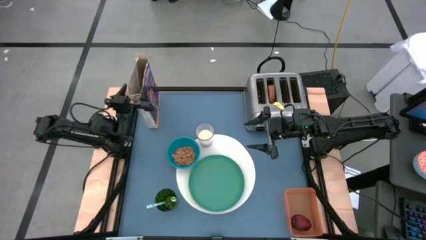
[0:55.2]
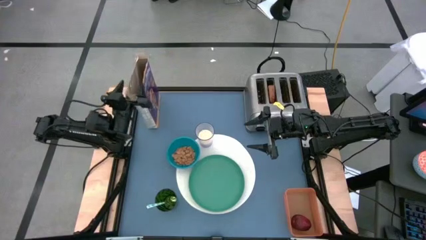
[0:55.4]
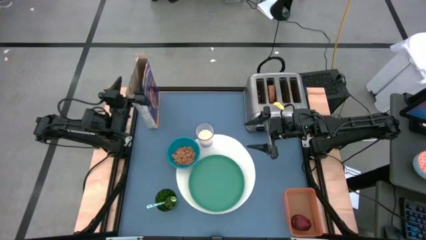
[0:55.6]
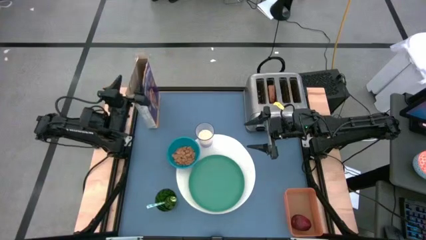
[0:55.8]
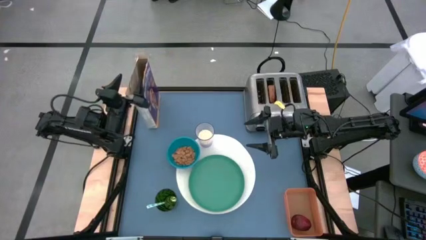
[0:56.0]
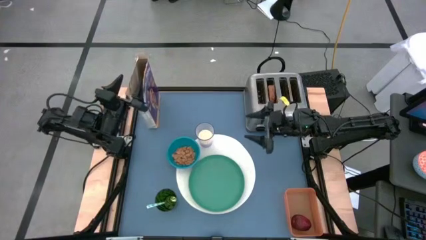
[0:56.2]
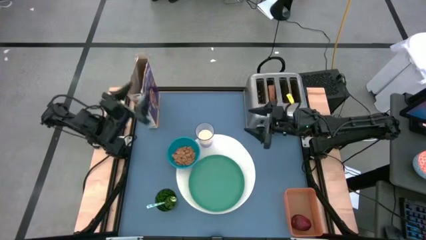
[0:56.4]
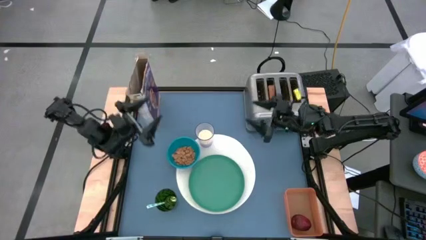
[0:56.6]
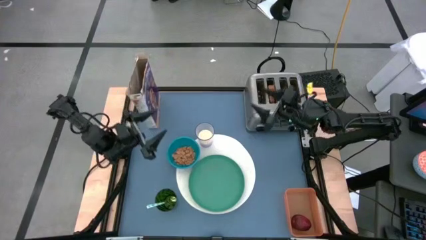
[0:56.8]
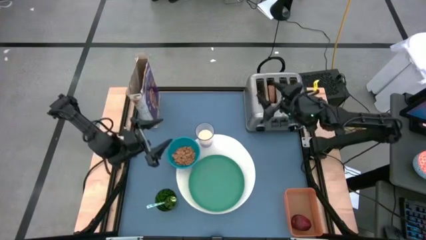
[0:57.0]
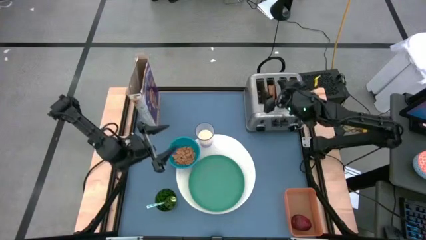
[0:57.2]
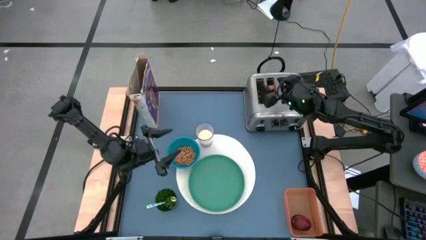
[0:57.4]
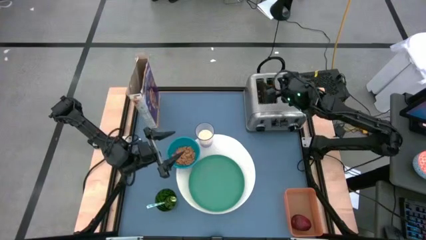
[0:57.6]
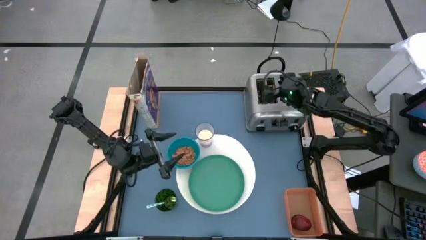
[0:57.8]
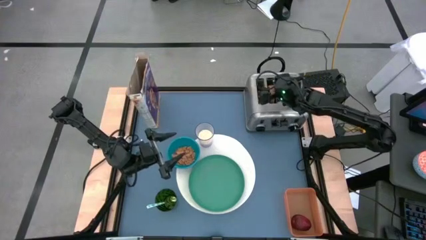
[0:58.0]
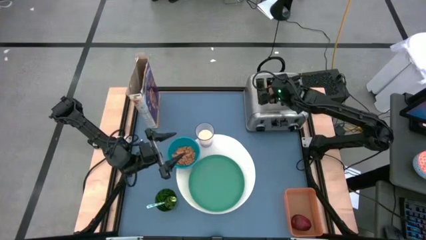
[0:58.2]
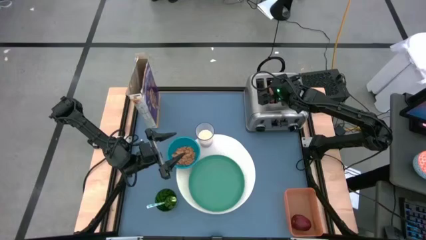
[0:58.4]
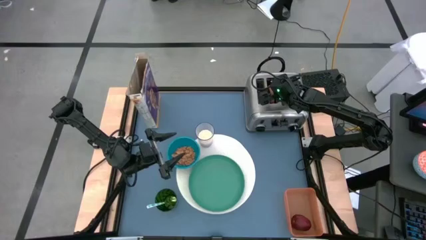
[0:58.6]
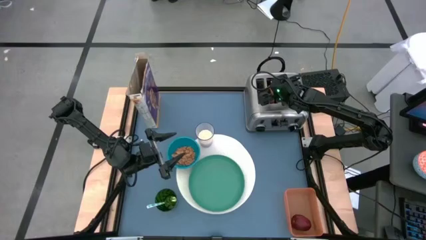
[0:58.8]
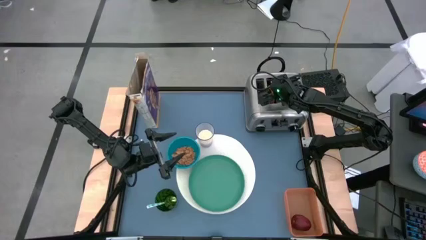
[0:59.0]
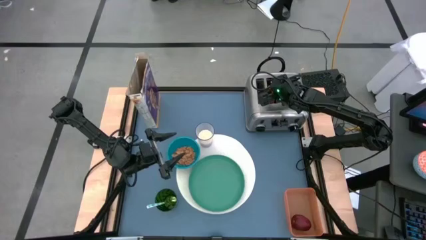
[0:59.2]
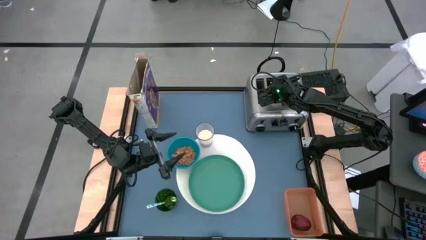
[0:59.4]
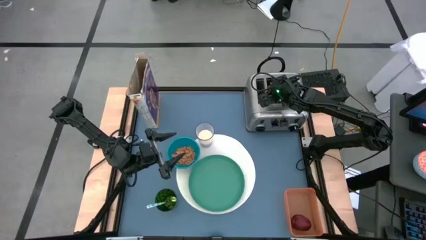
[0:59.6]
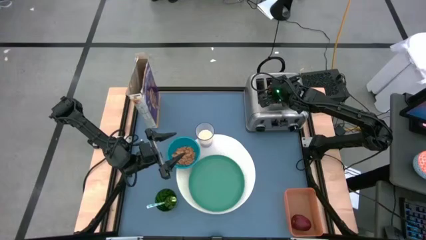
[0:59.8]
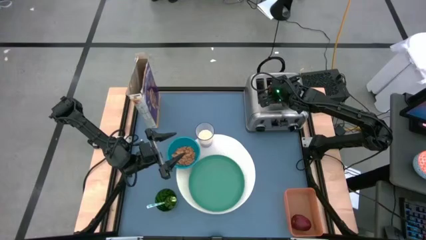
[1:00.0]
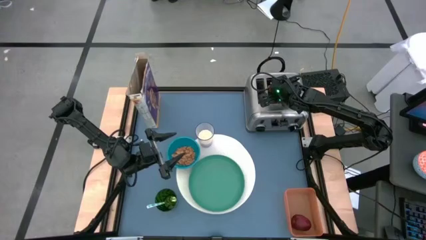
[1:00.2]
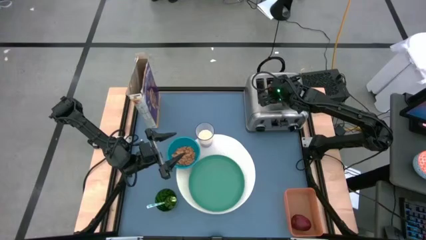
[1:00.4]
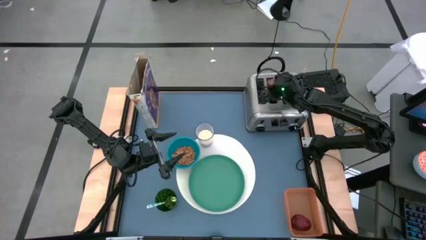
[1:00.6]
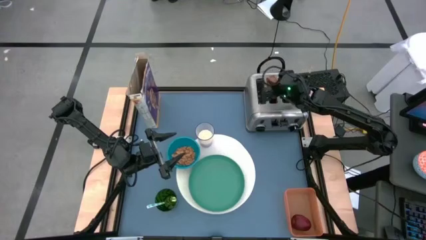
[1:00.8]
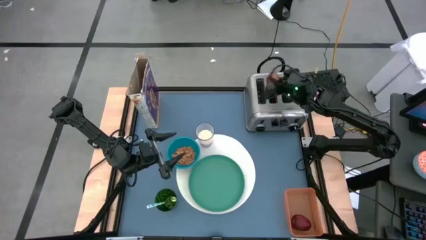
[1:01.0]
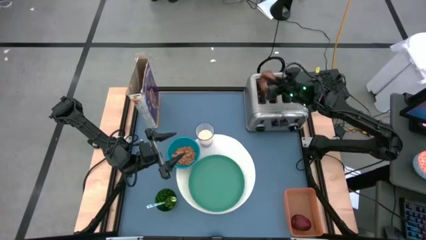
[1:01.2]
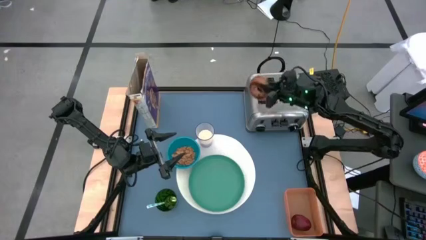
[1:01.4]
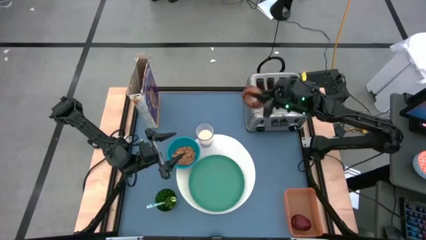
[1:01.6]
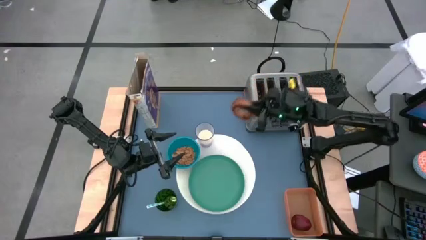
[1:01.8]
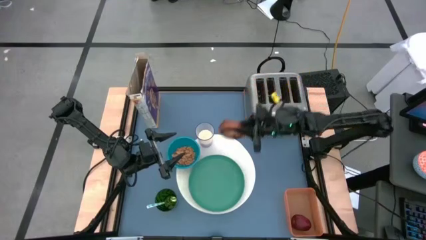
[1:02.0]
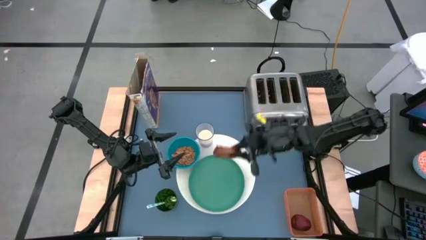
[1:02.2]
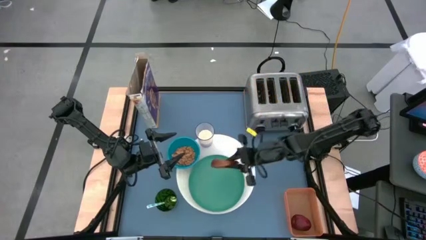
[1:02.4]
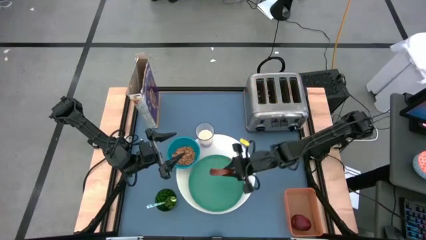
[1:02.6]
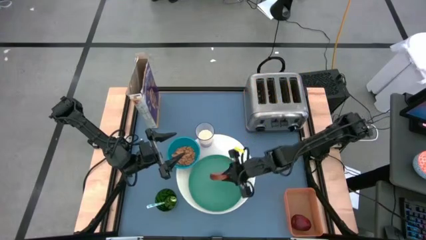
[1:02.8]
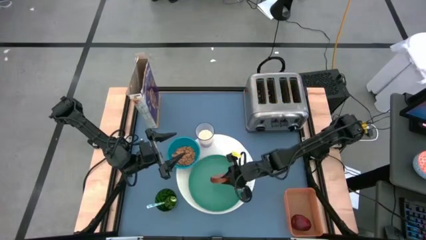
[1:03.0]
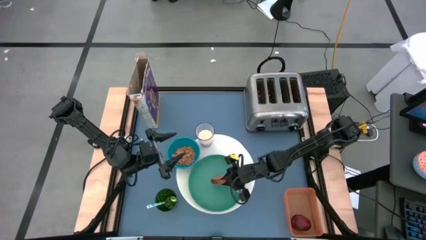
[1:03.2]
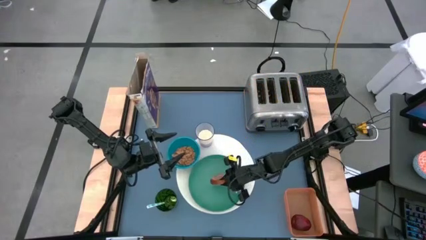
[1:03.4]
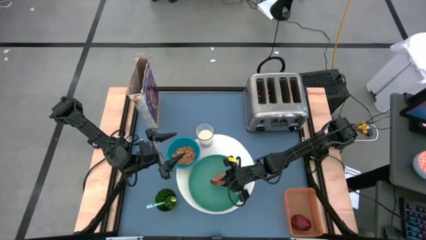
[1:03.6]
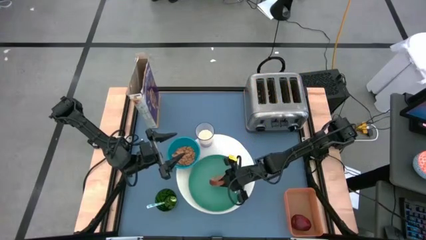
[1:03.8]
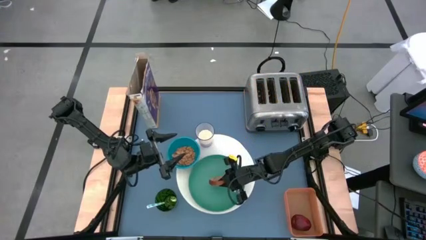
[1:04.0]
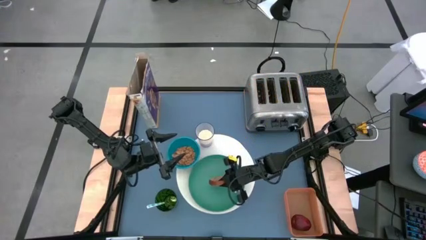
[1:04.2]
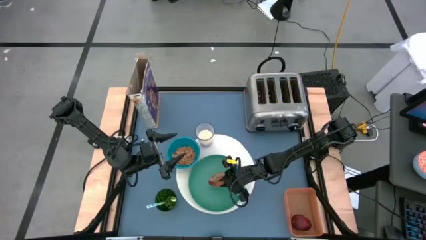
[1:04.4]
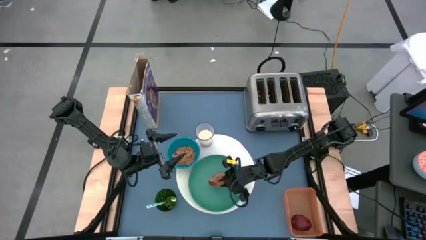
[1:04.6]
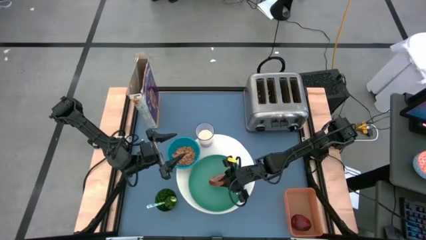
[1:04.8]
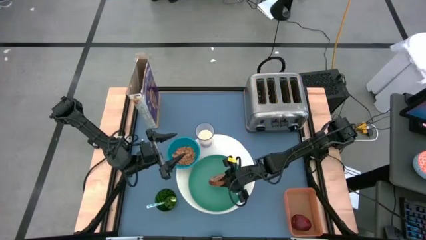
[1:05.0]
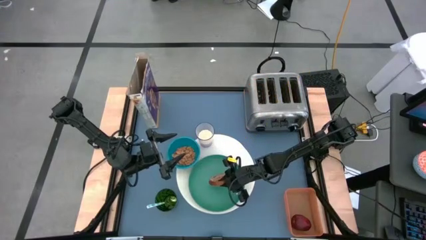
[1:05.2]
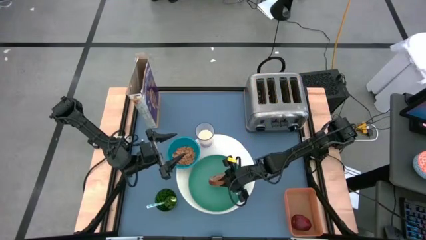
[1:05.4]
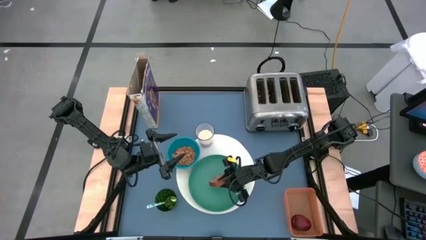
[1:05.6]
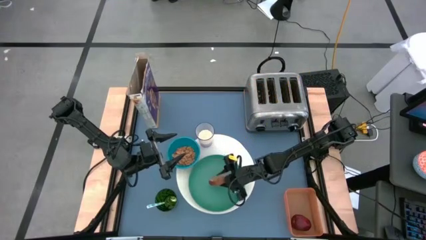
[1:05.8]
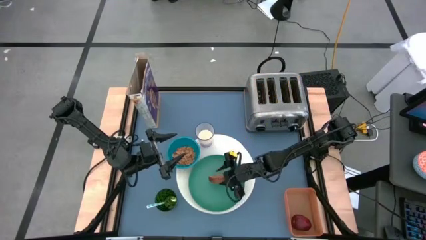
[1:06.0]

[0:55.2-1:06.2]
Task: Arrange a breakfast setting
Put the bagel on the green plate

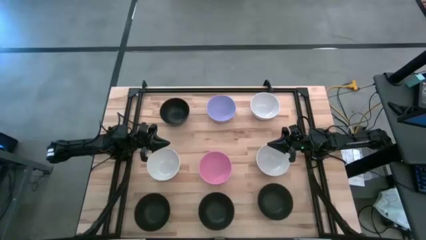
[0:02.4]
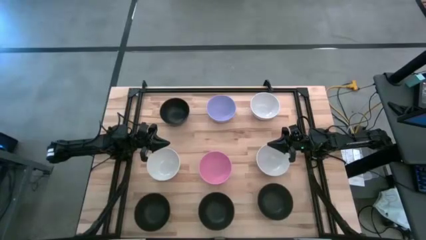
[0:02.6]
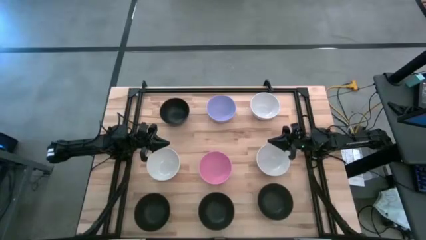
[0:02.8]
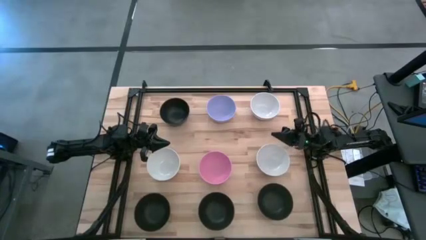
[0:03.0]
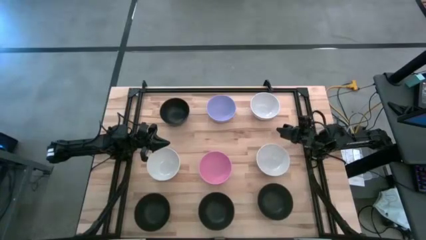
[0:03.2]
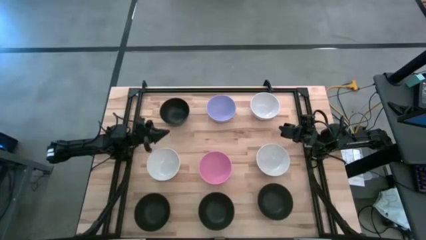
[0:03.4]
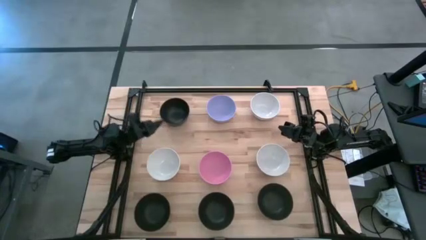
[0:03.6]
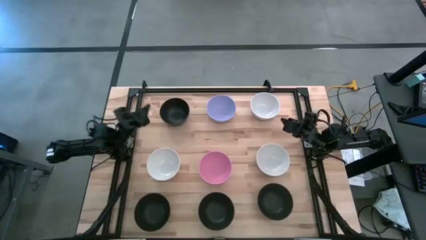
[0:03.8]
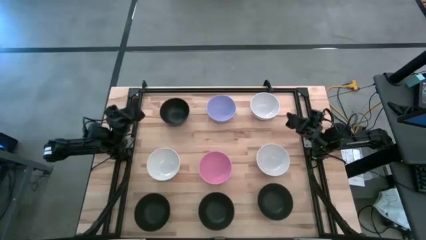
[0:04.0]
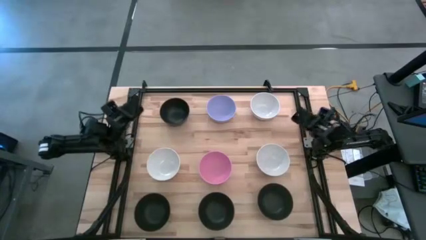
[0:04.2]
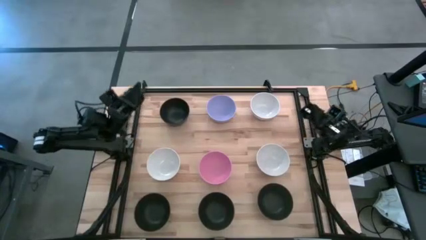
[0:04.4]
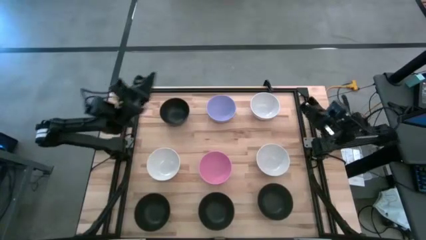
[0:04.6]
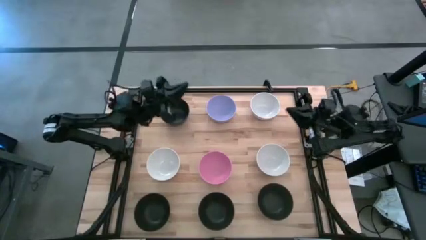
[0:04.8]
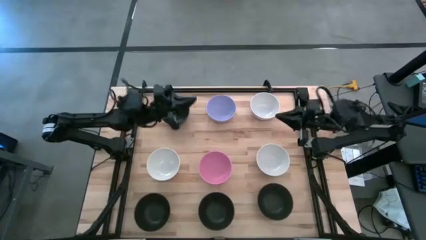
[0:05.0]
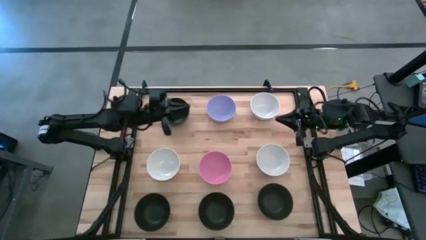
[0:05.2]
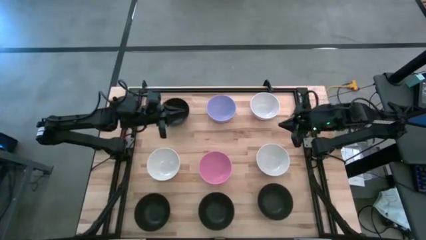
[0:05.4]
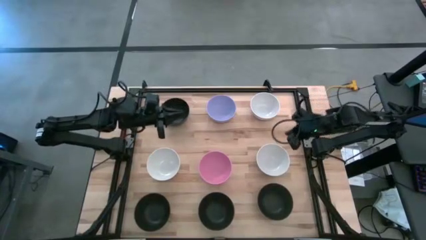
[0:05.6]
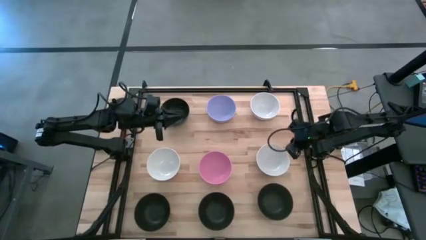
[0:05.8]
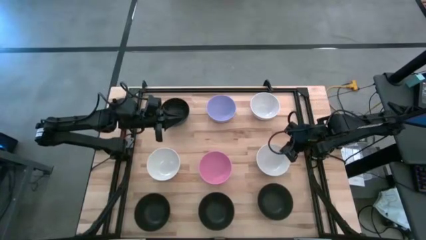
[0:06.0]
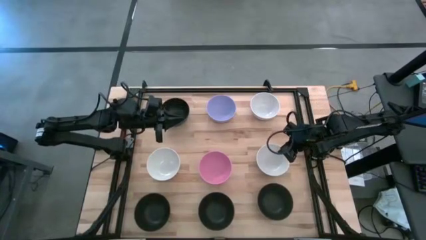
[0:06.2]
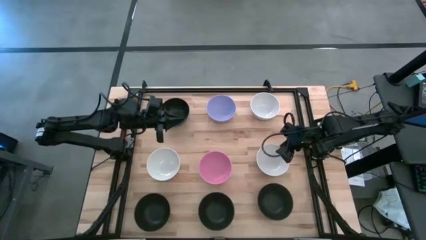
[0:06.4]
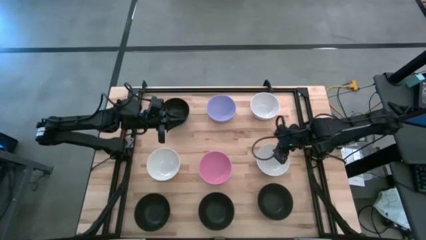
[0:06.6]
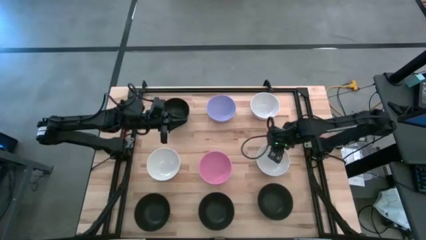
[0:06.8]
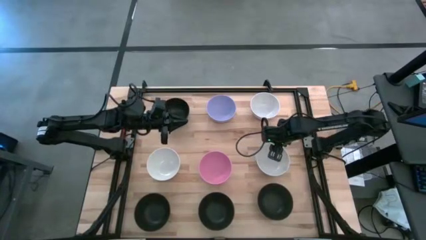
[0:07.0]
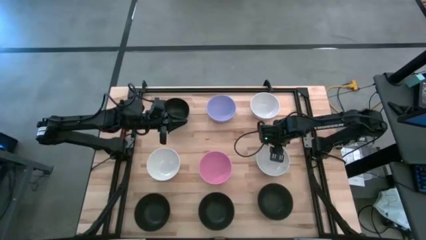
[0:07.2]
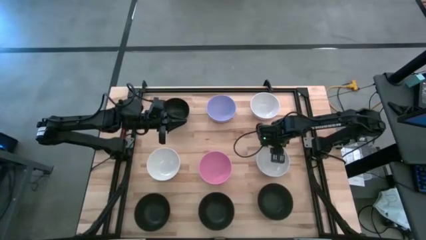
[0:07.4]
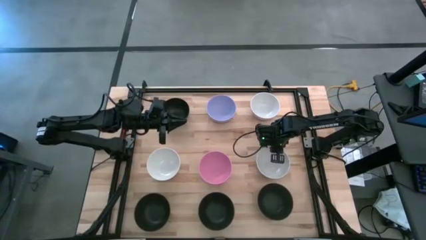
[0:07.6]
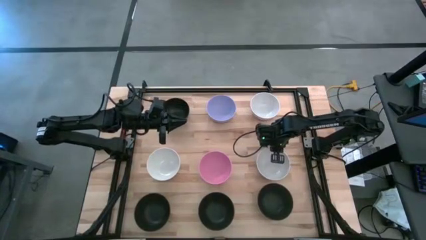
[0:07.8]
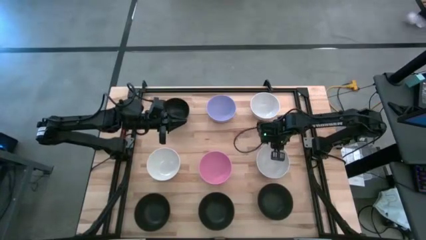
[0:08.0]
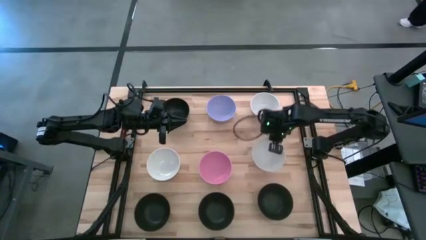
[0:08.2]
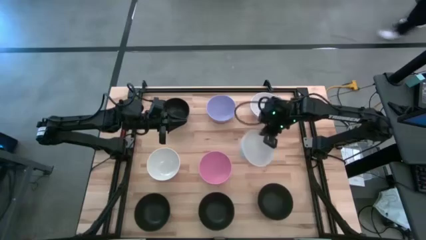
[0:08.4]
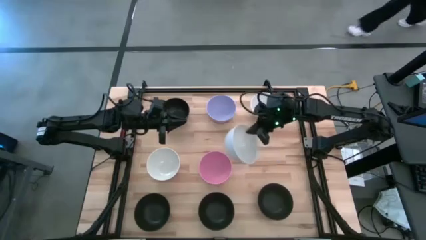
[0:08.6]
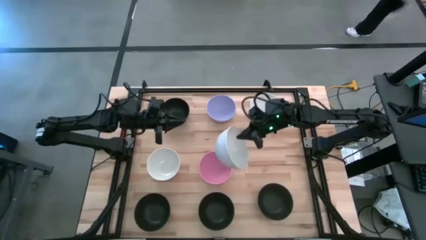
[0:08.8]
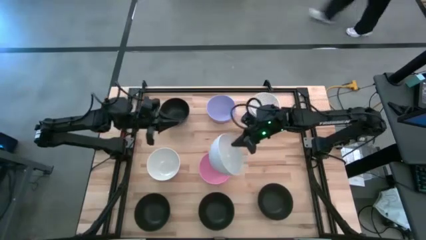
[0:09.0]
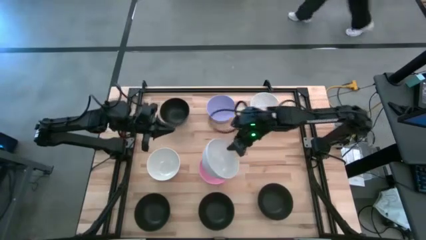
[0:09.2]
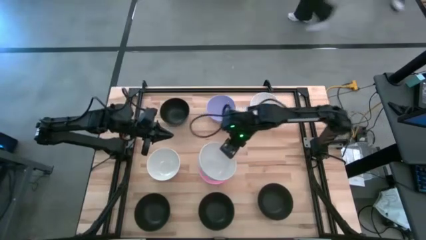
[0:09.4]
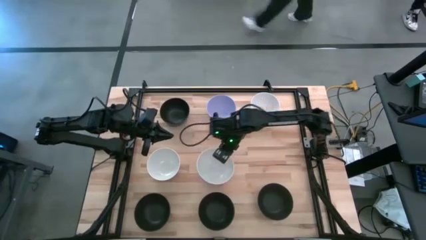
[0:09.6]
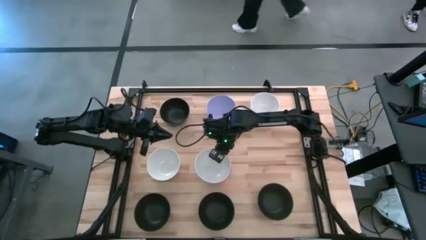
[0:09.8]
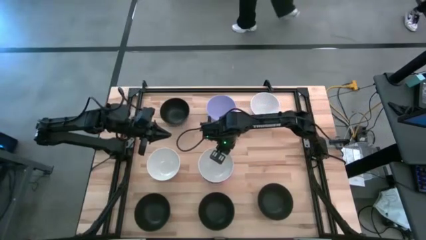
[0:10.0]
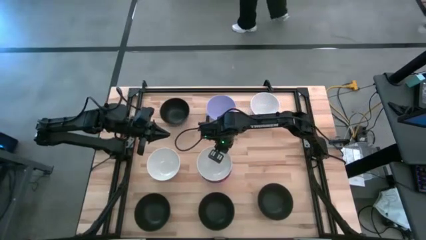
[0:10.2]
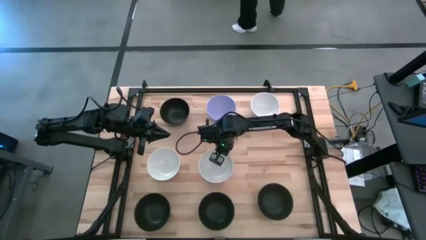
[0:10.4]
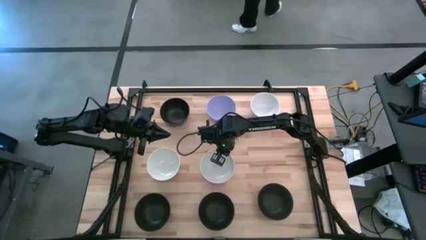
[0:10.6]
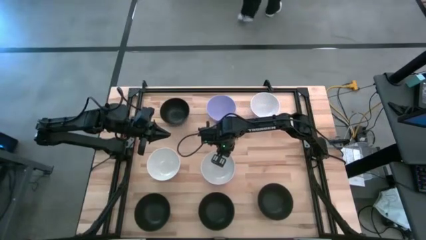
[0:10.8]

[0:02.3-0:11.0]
Task: Nest bowls inside each other
Stack the bottom right white bowl on top of the pink bowl
